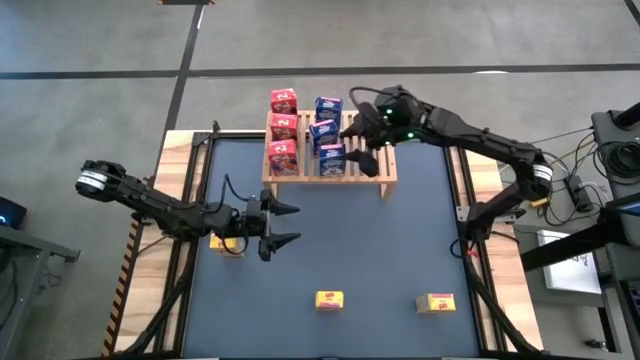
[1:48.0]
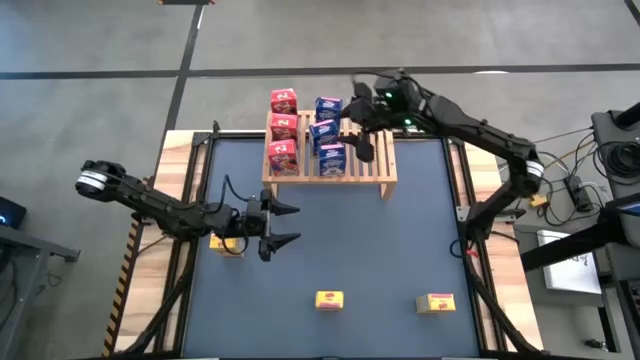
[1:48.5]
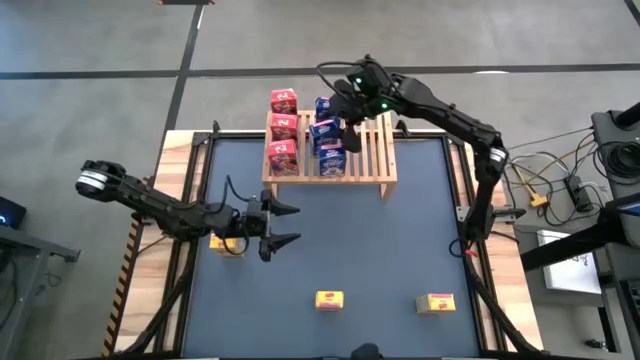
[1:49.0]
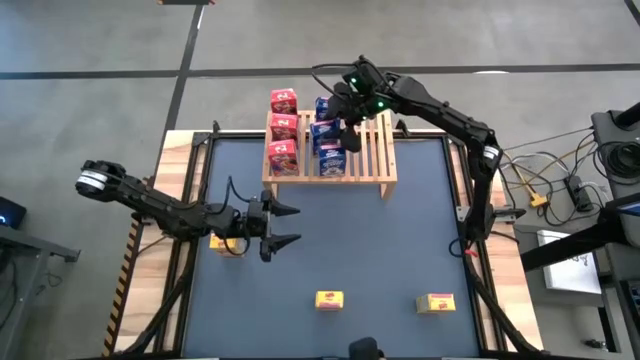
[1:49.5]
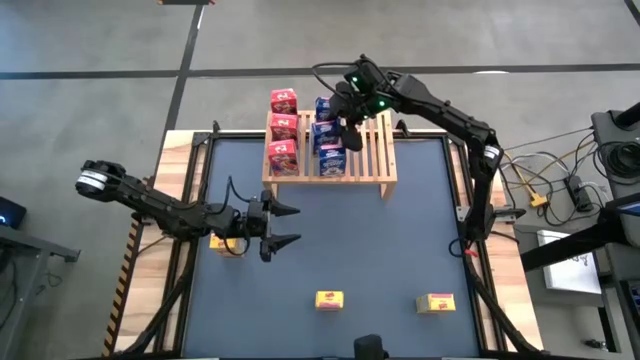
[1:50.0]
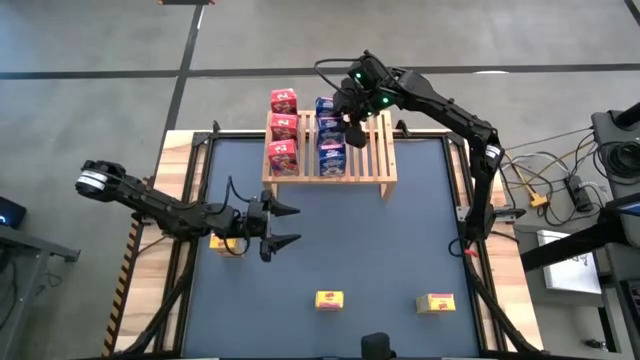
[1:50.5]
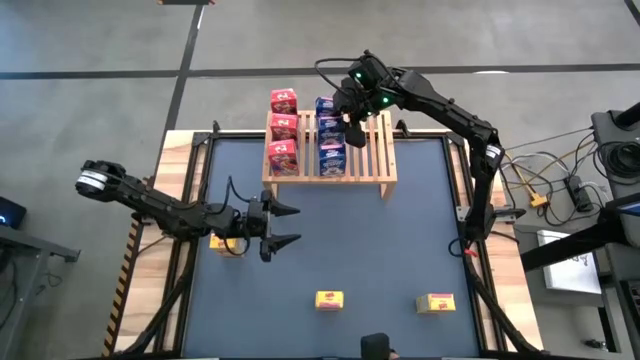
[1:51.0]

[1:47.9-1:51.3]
Task: Stack cereal on shelf
Adjust the middle blue cereal box on the shelf

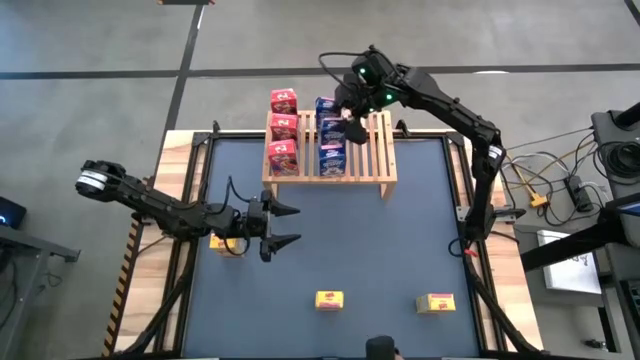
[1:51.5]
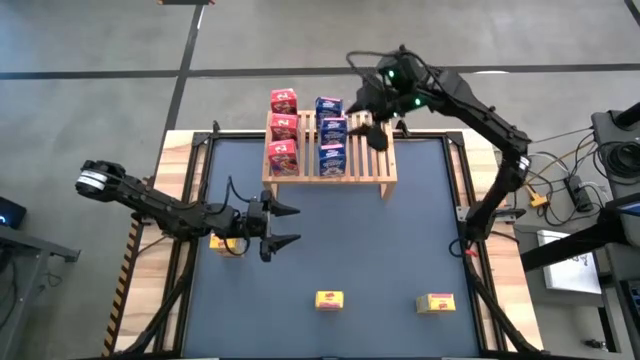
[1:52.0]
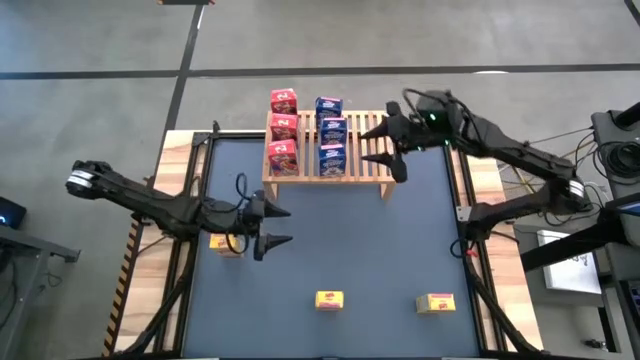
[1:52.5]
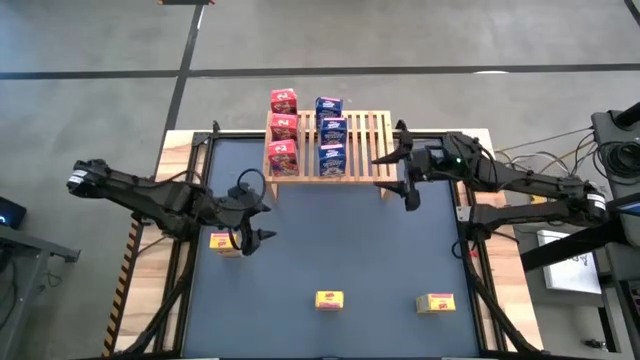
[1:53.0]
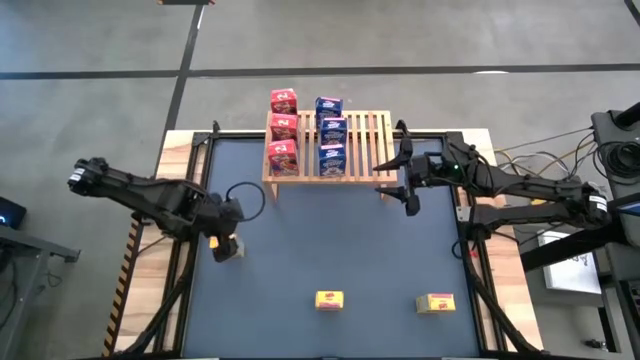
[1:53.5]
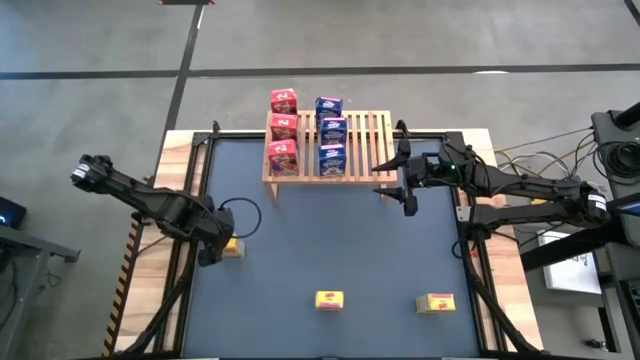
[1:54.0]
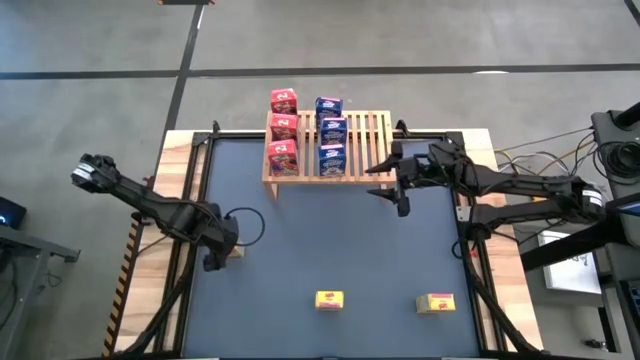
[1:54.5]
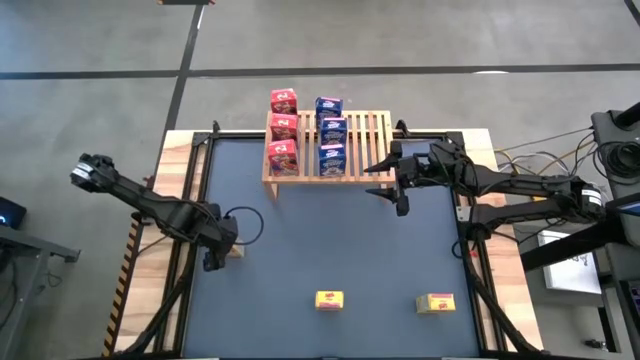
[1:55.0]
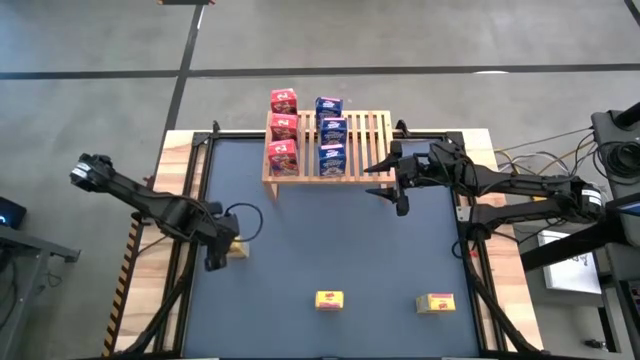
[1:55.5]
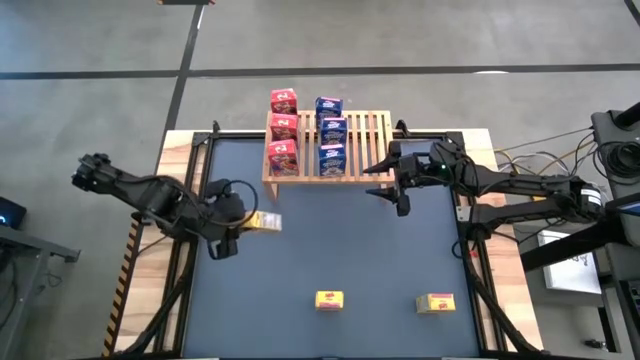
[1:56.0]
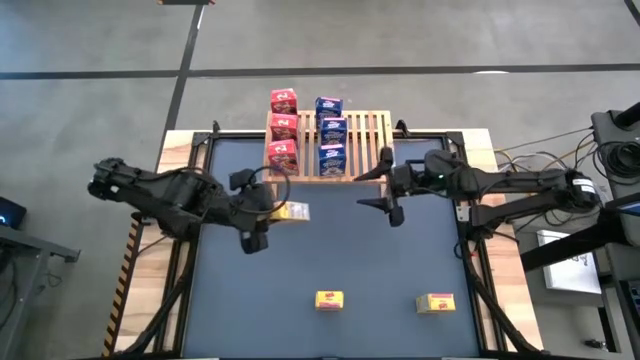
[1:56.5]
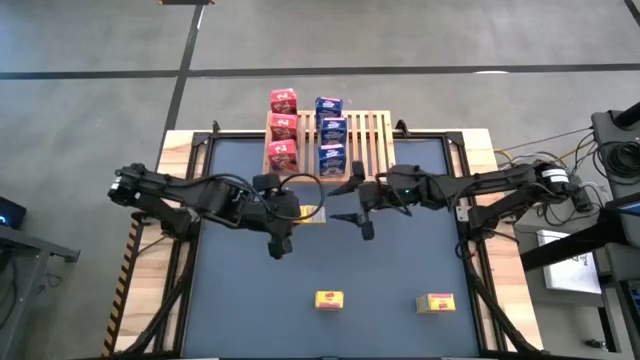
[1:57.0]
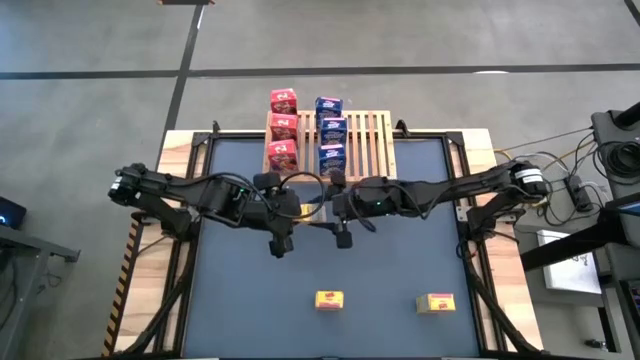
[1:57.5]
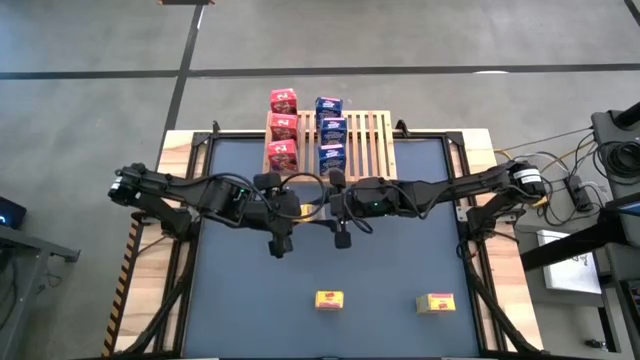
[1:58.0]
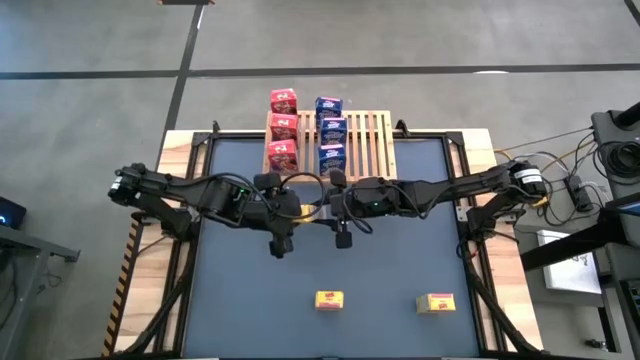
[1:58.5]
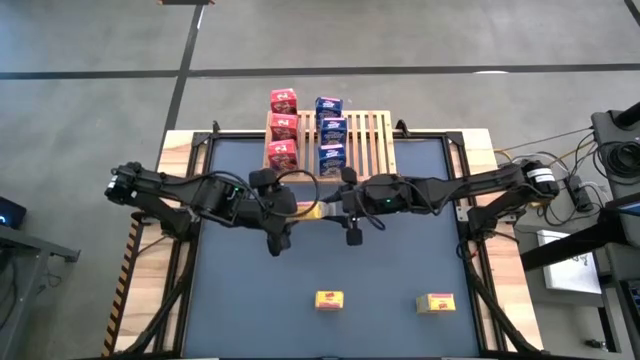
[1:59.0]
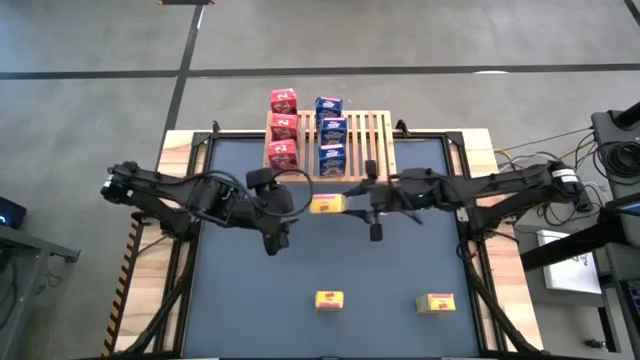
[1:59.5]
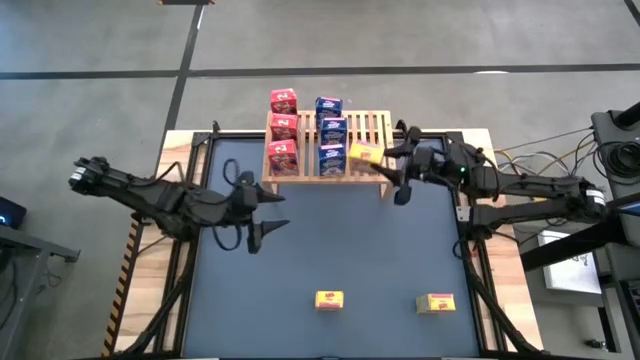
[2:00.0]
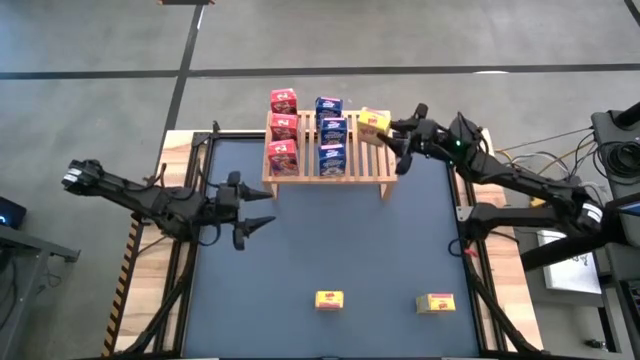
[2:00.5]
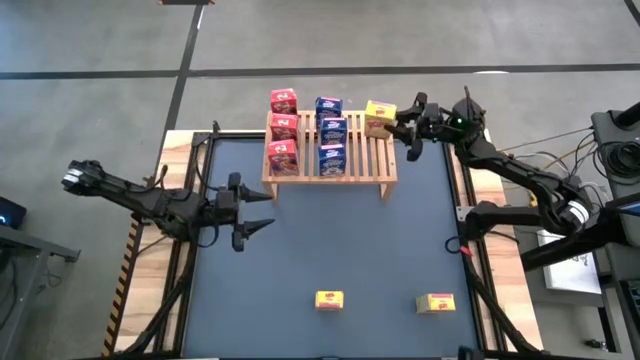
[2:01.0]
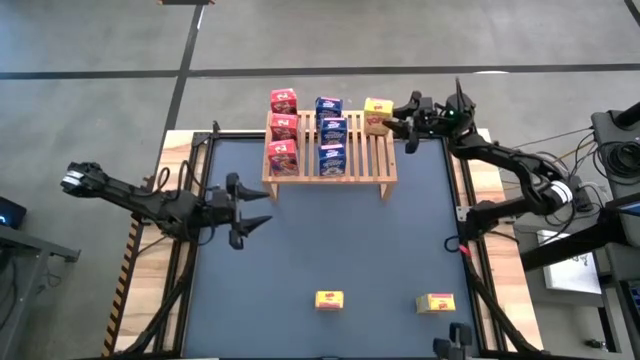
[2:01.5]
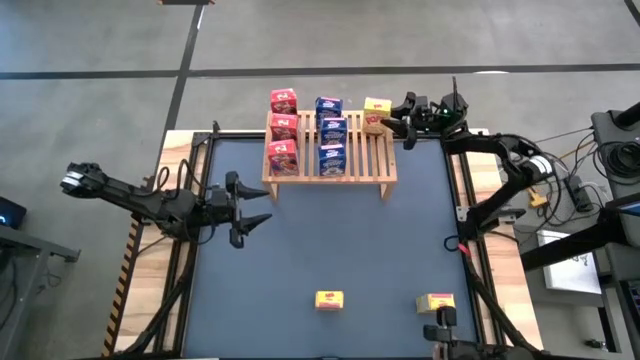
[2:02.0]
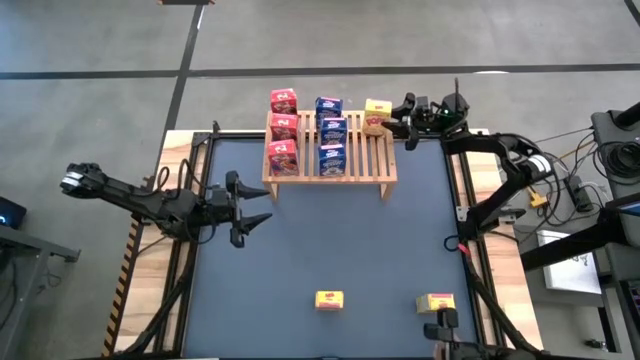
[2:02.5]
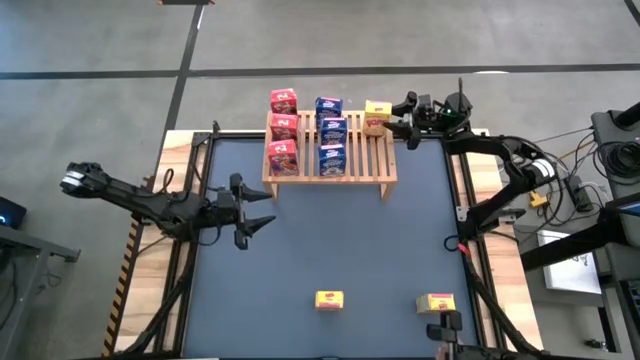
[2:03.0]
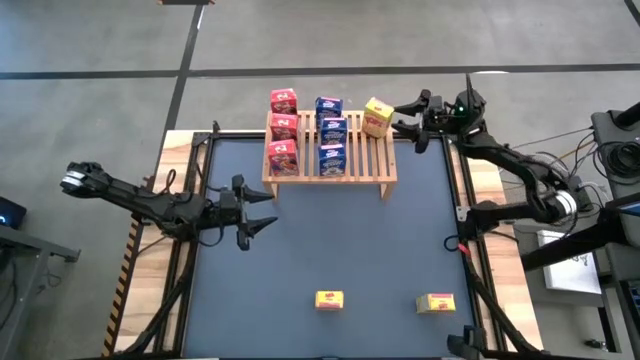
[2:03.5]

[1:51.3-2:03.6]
Put the top yellow cereal box on the shelf
